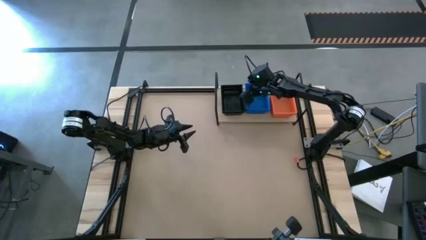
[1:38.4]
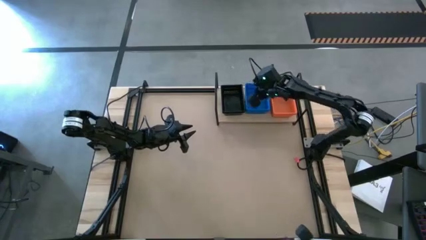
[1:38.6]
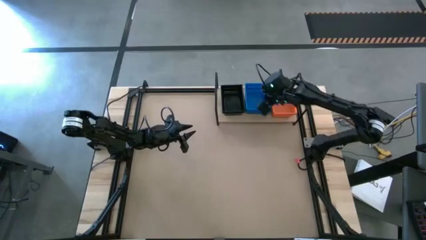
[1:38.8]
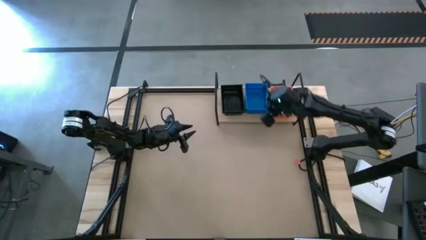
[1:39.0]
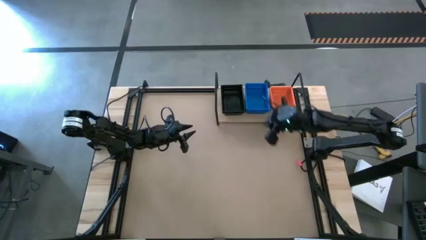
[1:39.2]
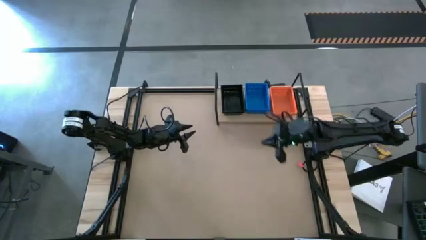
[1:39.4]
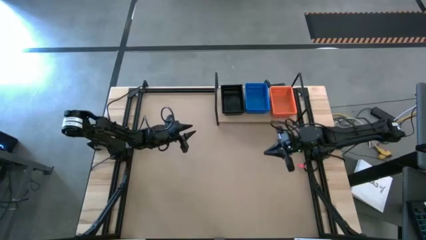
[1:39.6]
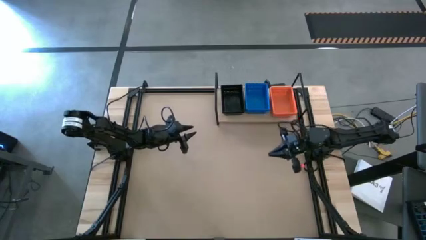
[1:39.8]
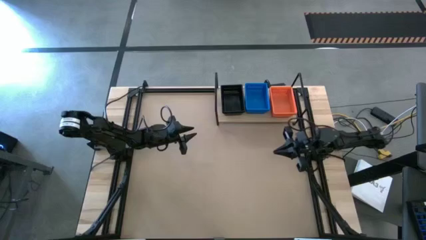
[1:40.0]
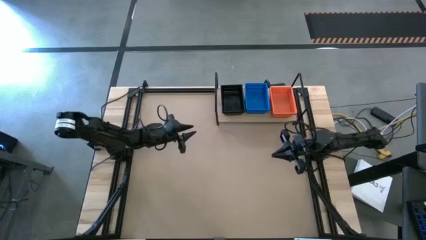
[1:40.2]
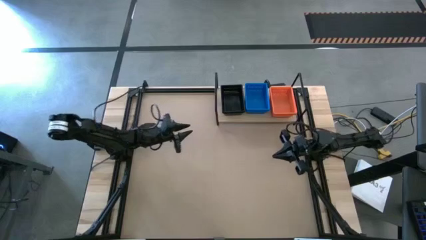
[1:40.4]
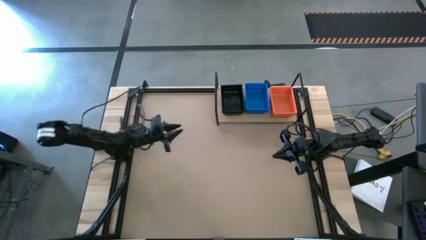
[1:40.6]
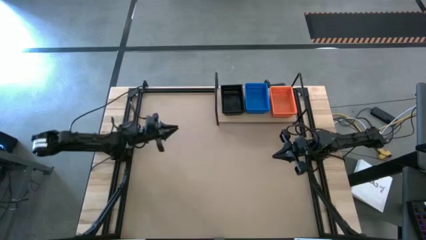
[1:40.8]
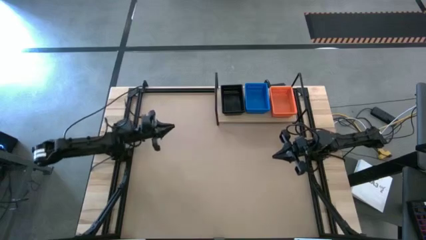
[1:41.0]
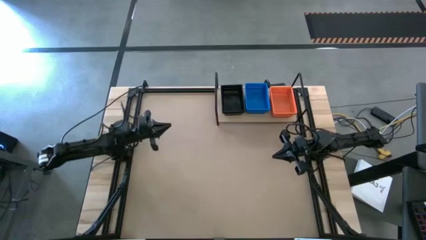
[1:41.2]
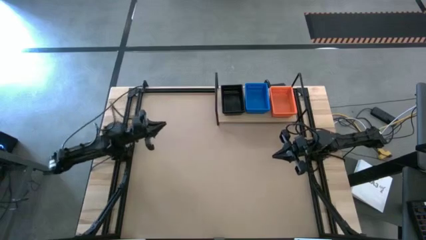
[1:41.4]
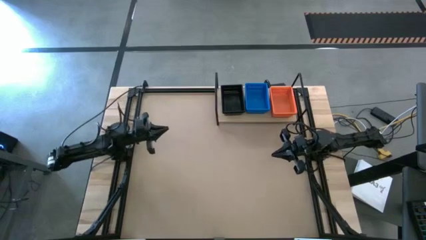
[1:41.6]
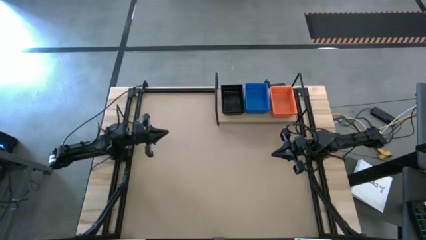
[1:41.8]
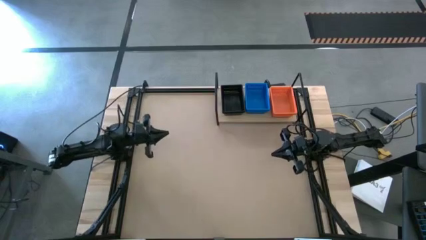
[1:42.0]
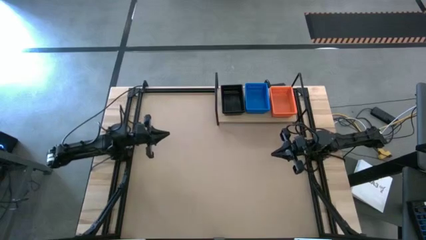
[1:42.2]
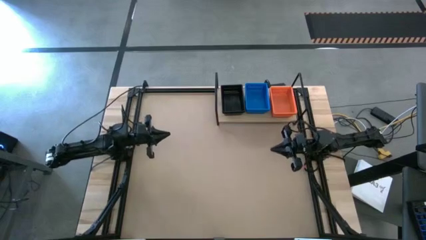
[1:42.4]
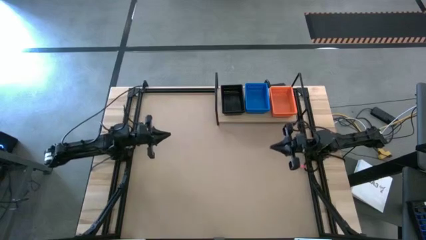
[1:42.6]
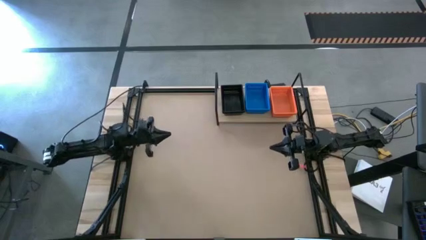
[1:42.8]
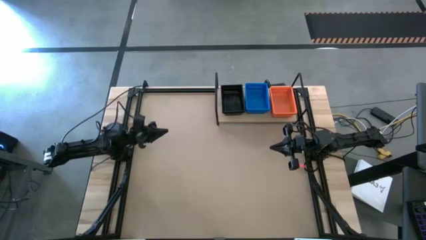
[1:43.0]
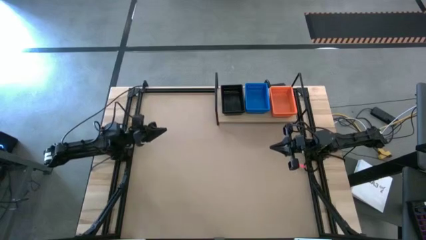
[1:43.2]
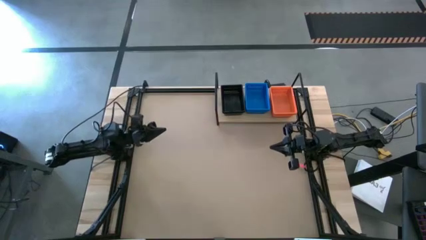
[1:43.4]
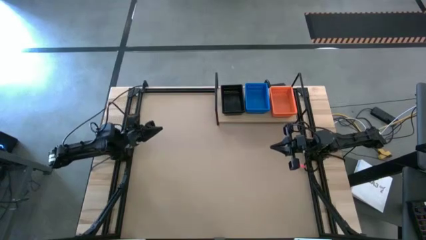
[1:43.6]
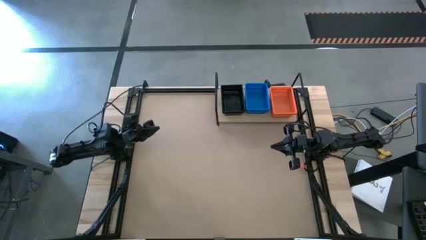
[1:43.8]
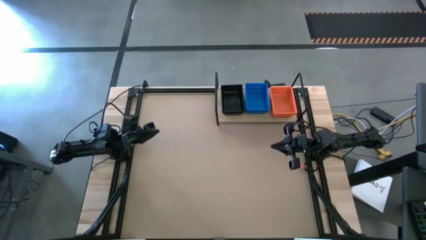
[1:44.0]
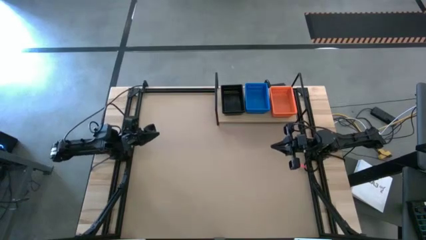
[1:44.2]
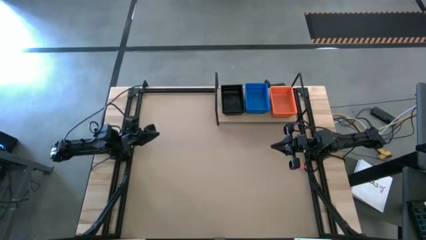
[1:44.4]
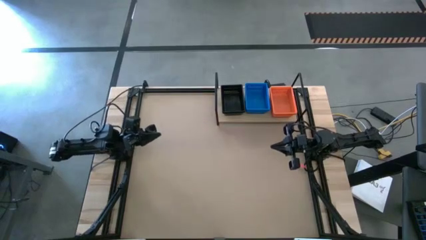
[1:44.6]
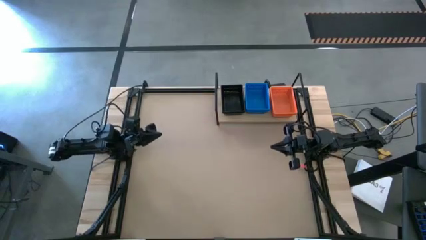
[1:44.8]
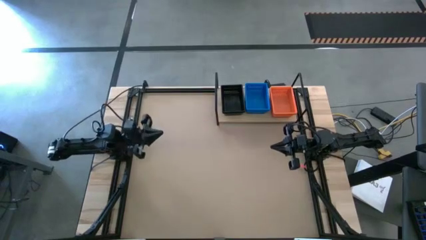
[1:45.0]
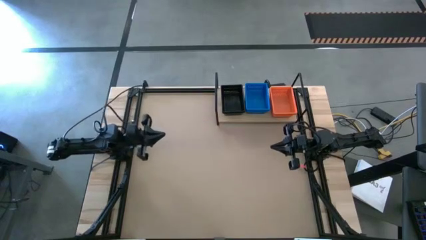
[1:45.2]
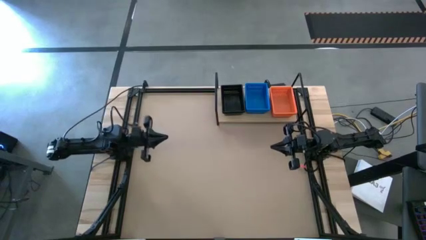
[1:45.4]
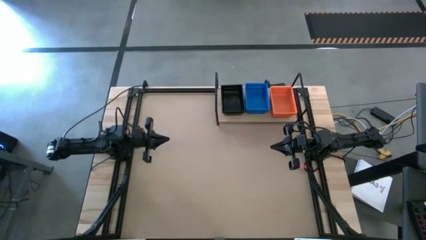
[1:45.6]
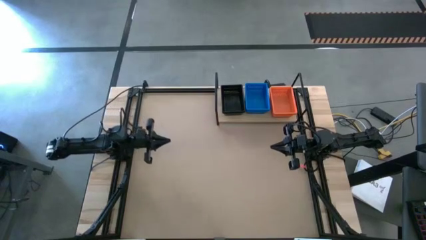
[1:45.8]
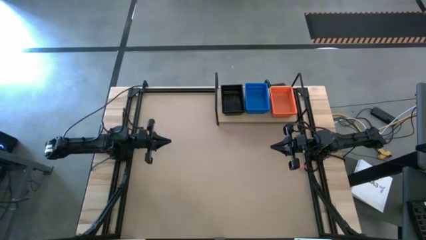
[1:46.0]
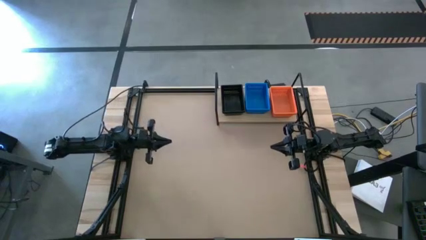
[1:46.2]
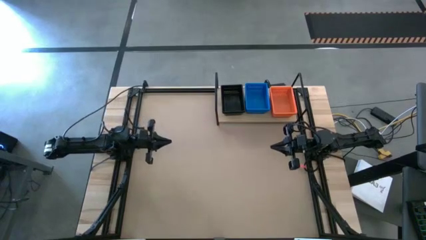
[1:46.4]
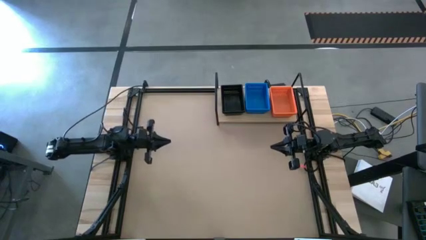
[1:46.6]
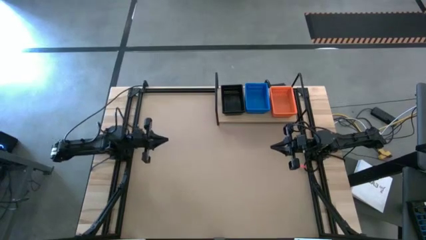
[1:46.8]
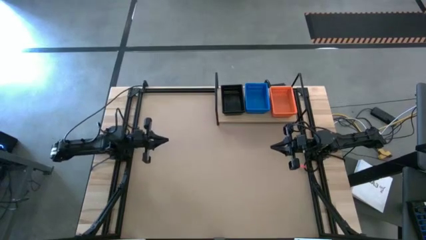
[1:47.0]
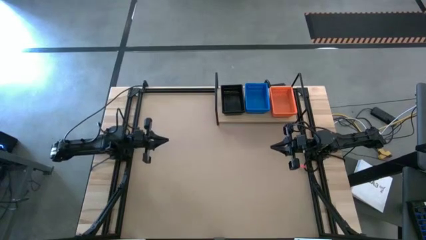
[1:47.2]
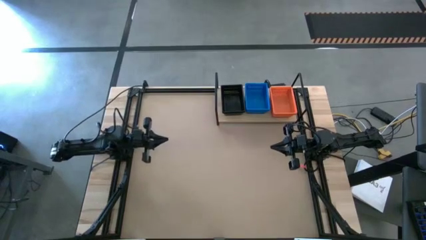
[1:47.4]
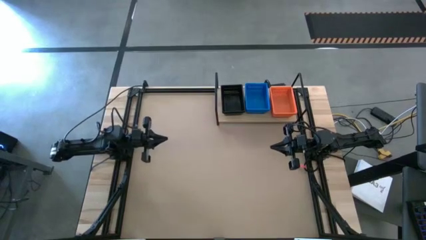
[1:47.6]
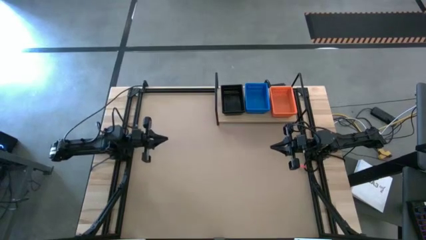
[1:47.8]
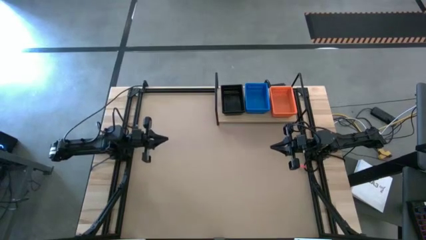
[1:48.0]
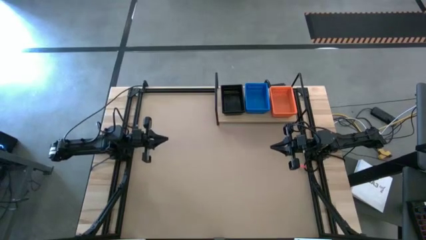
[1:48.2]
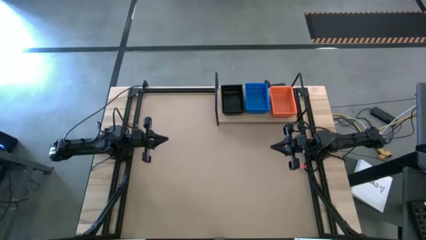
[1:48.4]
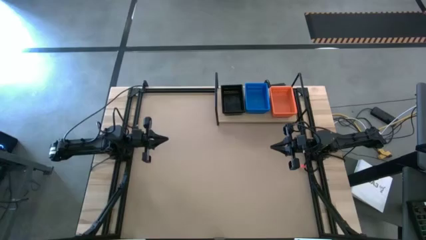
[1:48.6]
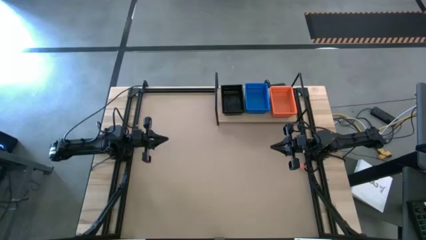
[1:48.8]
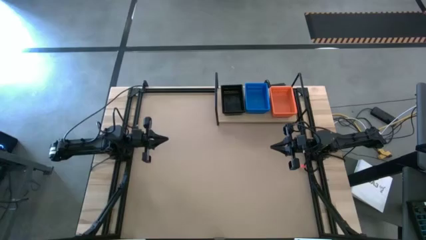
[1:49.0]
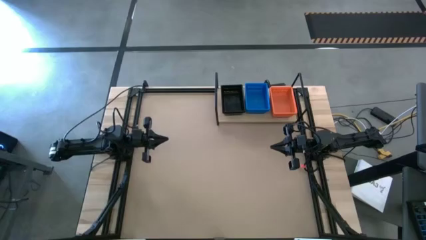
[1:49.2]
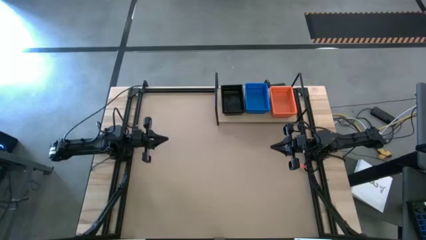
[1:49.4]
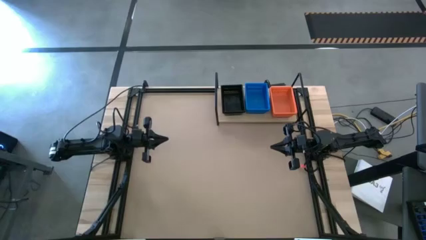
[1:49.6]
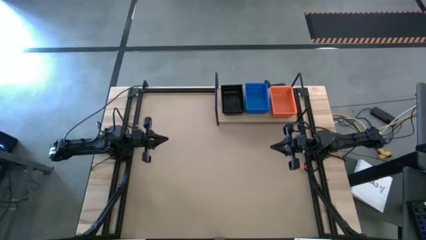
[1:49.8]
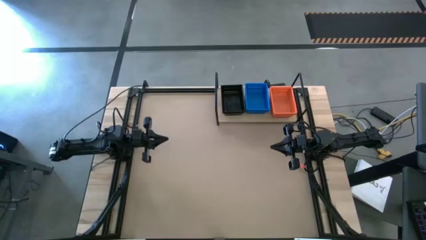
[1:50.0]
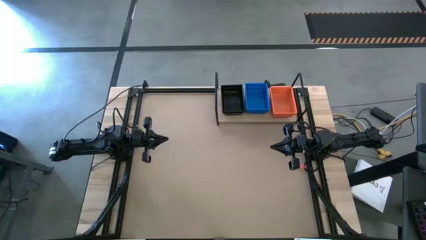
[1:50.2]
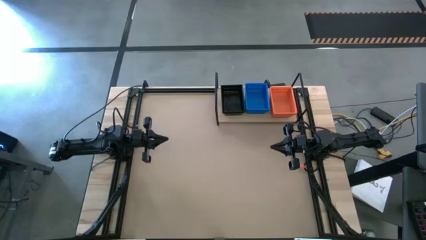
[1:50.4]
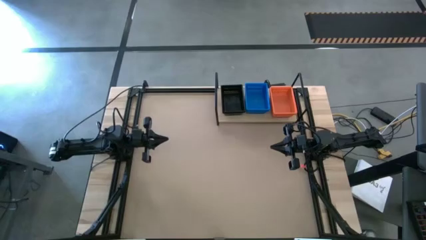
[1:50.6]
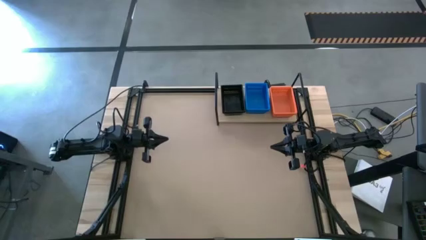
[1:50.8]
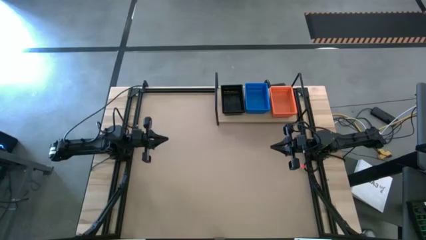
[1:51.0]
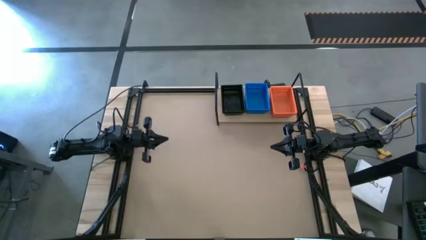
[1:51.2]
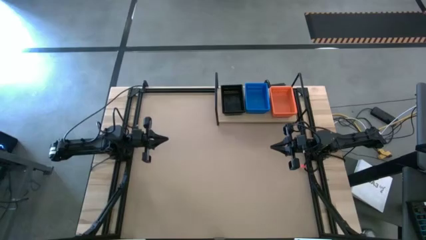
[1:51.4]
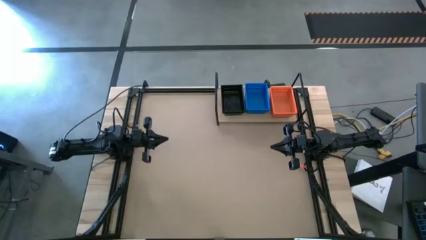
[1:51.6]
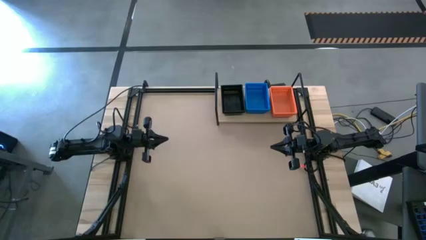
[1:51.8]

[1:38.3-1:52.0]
Task: Stack baskets on shelf by color
Return to Home Position

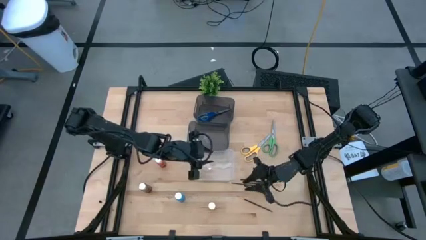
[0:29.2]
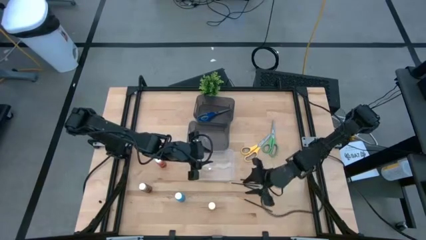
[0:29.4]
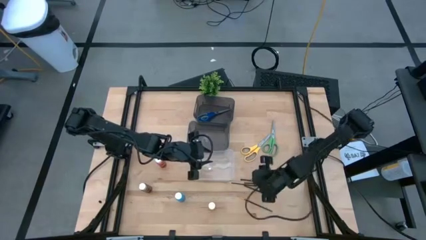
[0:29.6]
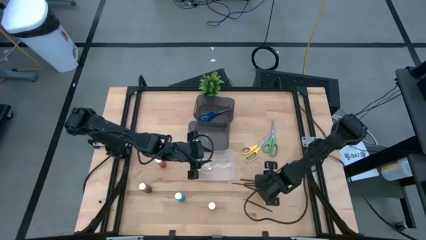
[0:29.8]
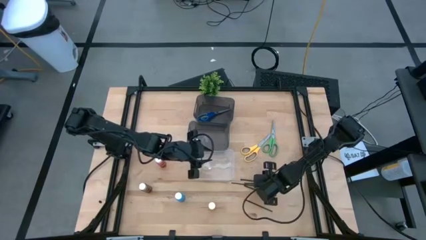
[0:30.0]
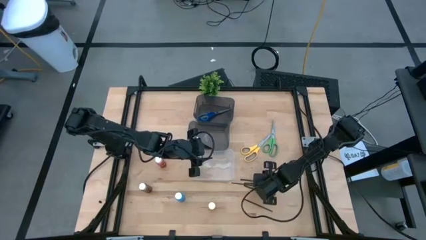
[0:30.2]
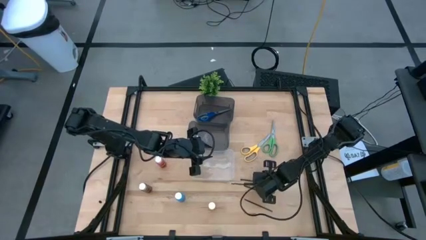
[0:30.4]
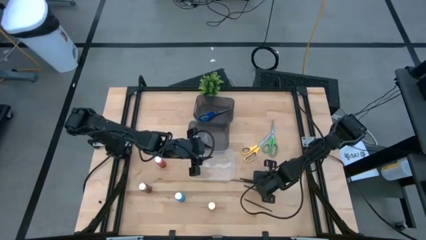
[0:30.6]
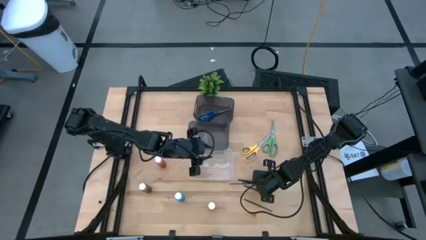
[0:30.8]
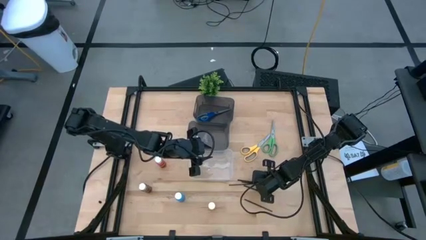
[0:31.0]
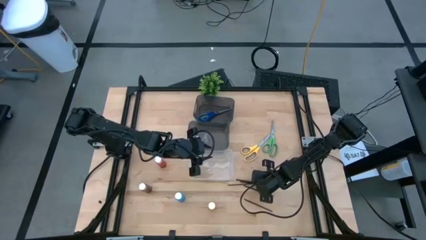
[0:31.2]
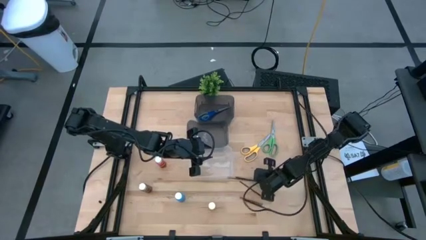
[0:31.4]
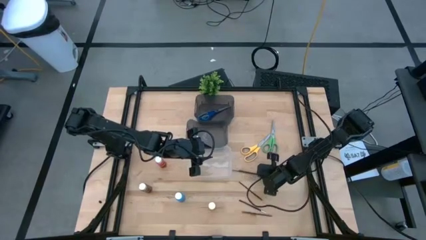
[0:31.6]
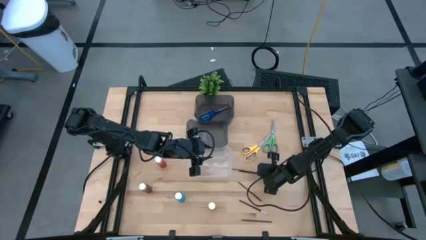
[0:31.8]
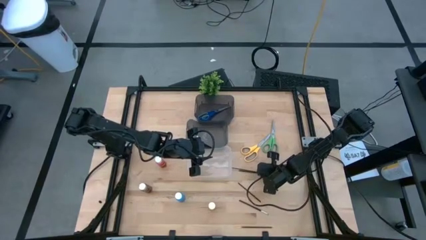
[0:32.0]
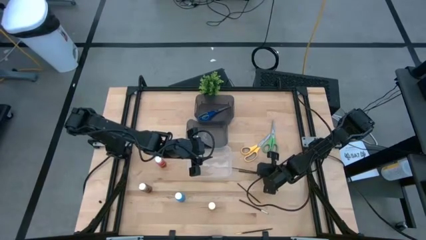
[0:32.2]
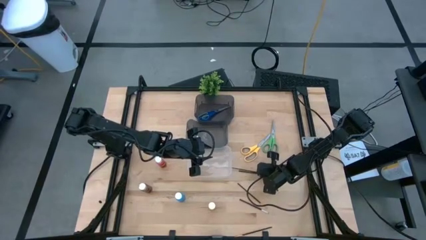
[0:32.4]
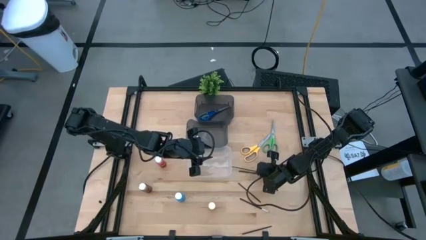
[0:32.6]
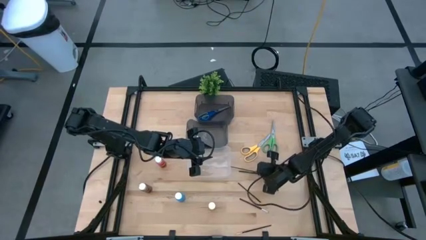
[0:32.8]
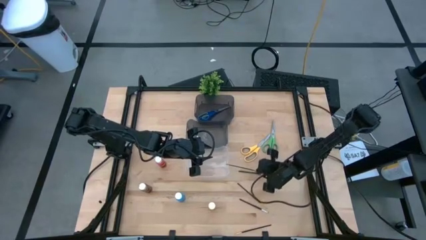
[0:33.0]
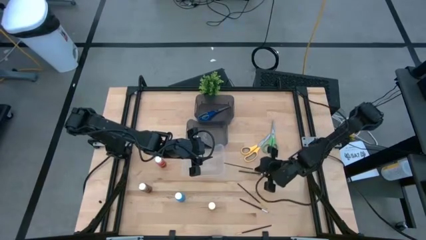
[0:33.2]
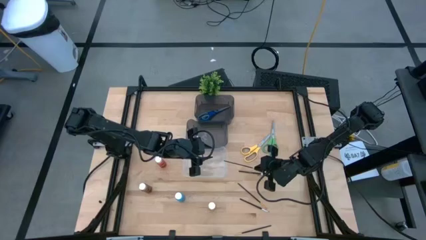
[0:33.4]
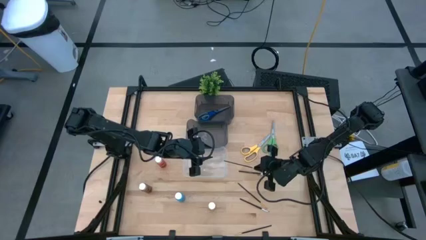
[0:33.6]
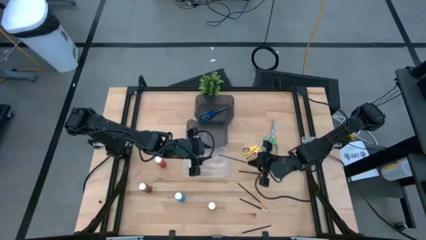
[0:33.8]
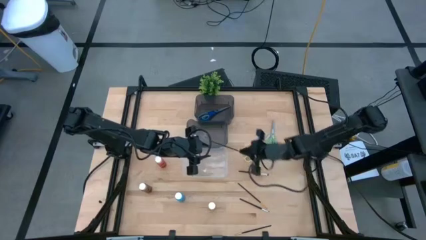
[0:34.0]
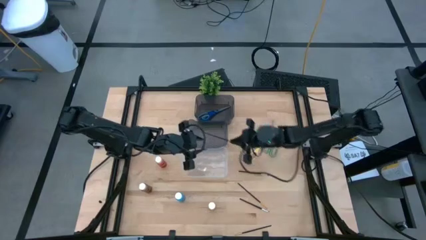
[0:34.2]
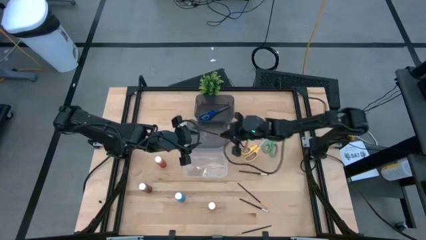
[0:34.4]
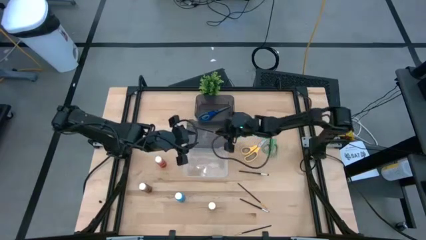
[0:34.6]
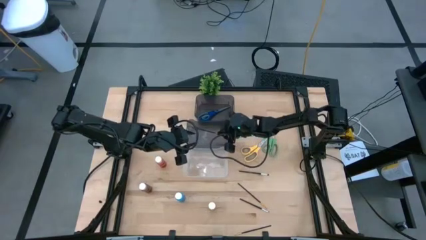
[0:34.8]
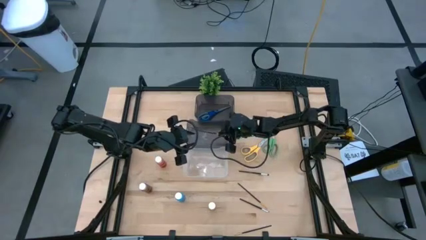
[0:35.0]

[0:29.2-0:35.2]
Task: Pick & Place Paint Supplies
Put the gold paintbrush into the bottom black bin
